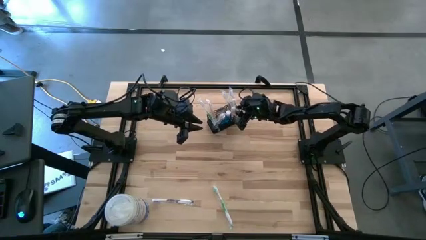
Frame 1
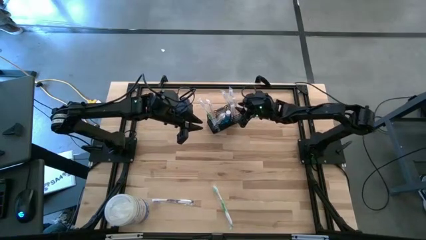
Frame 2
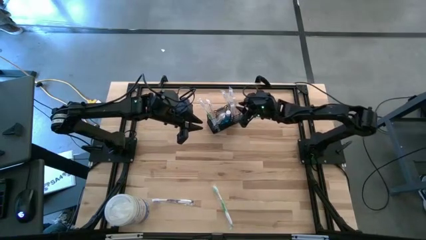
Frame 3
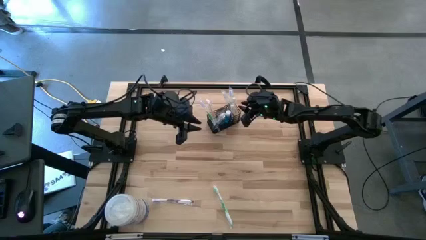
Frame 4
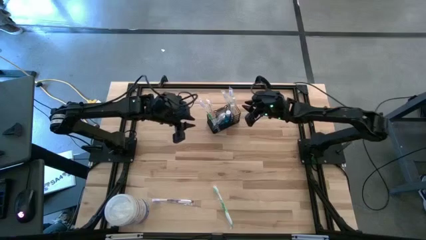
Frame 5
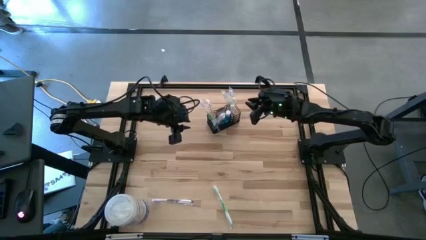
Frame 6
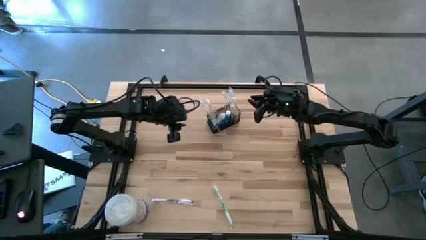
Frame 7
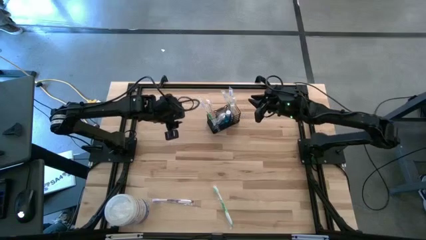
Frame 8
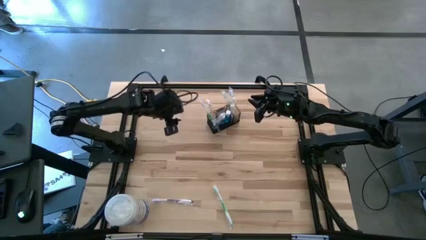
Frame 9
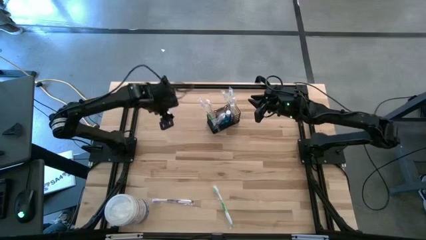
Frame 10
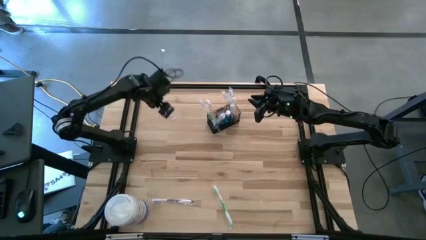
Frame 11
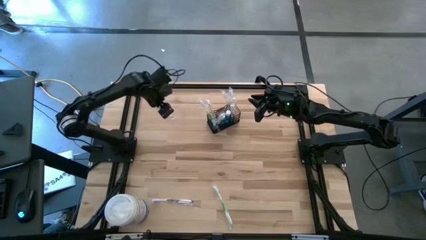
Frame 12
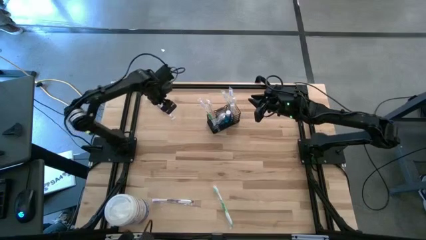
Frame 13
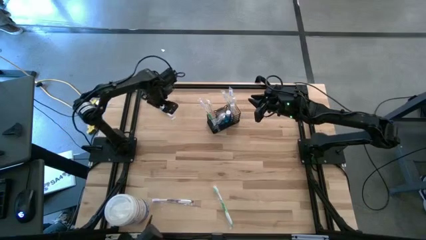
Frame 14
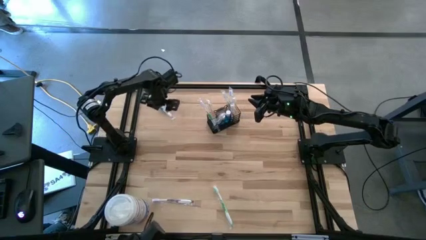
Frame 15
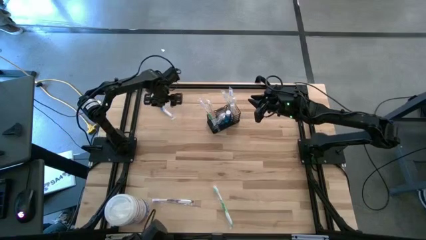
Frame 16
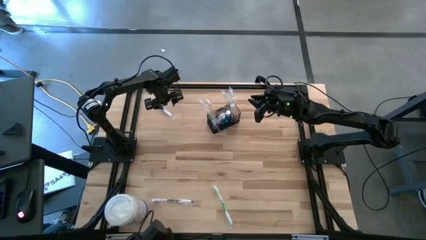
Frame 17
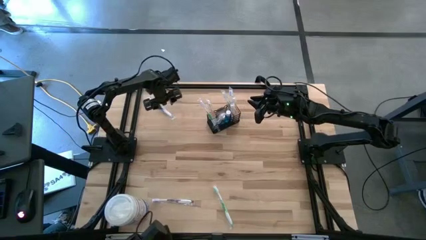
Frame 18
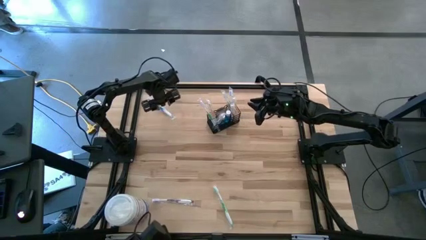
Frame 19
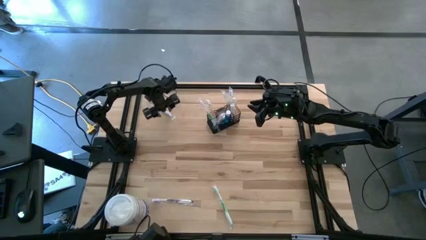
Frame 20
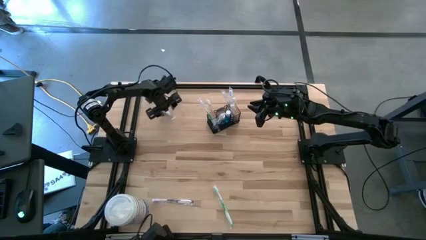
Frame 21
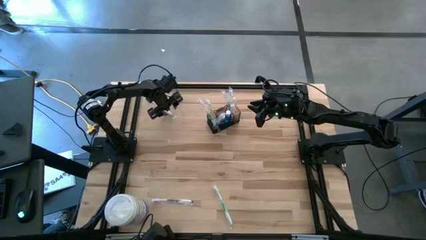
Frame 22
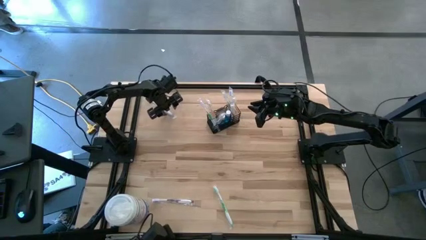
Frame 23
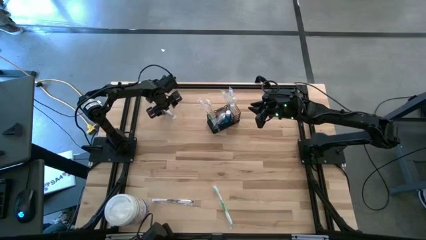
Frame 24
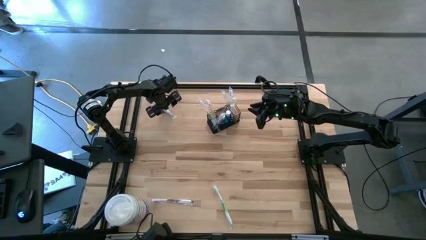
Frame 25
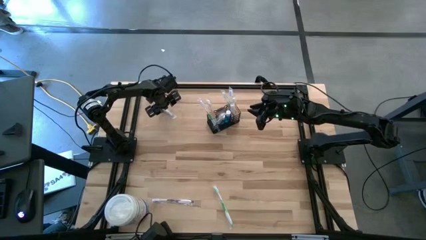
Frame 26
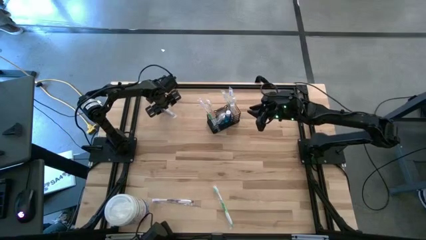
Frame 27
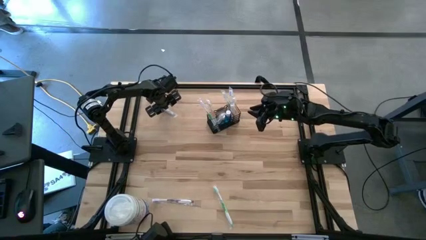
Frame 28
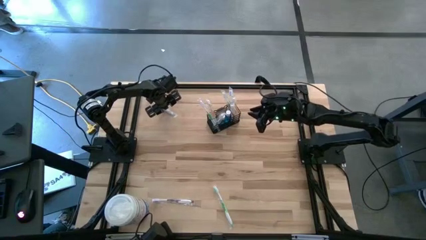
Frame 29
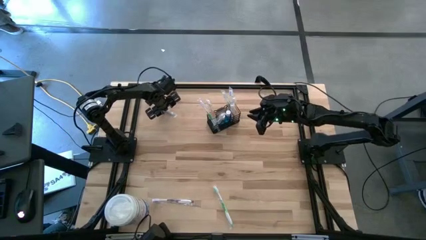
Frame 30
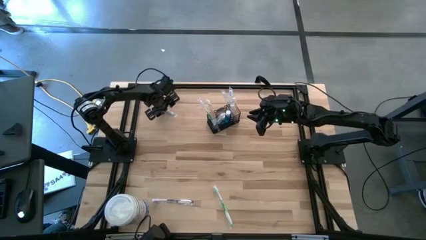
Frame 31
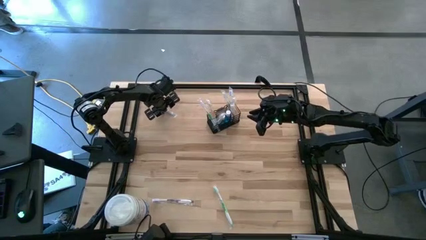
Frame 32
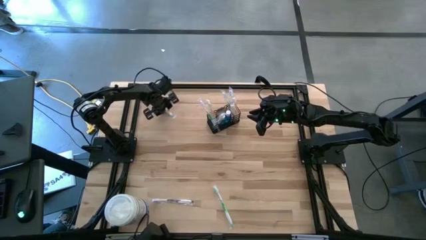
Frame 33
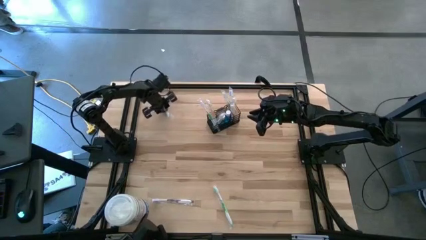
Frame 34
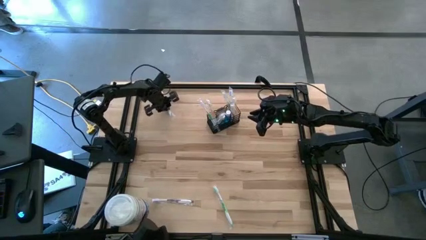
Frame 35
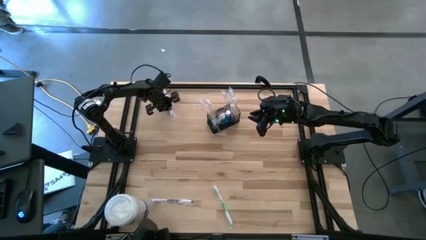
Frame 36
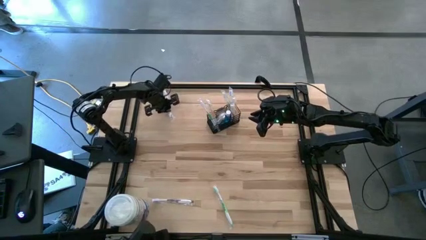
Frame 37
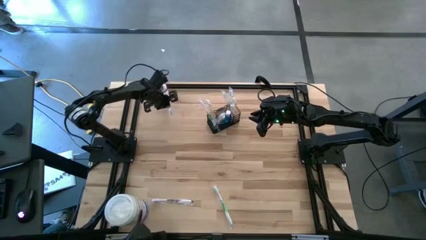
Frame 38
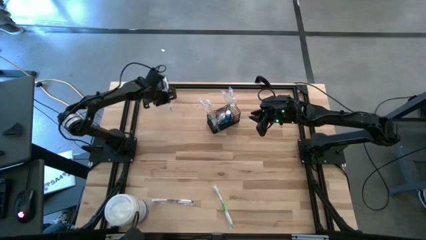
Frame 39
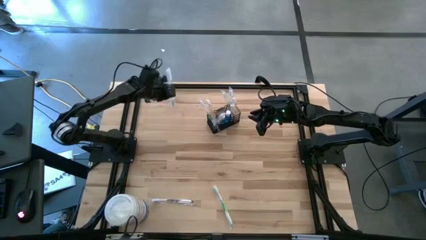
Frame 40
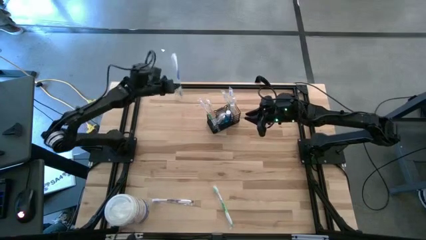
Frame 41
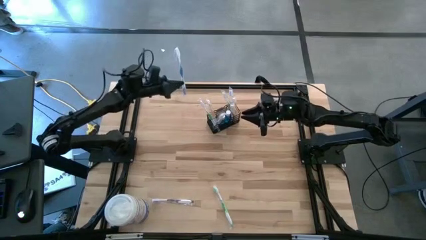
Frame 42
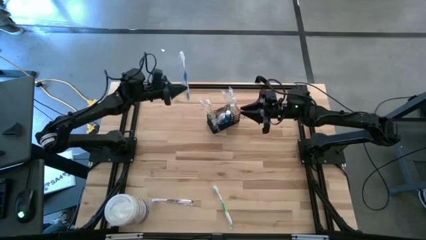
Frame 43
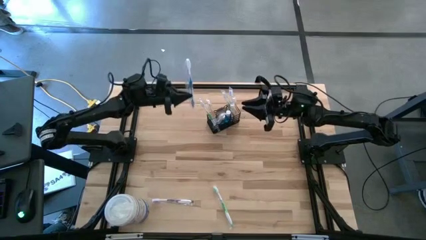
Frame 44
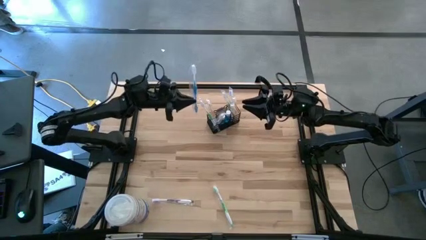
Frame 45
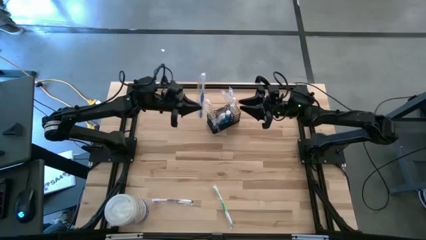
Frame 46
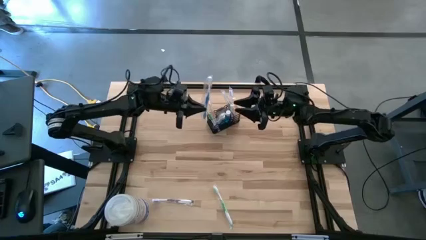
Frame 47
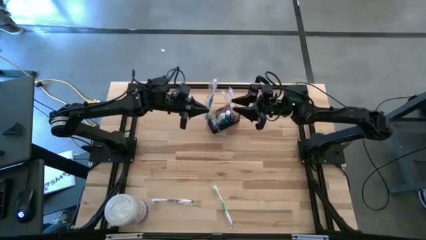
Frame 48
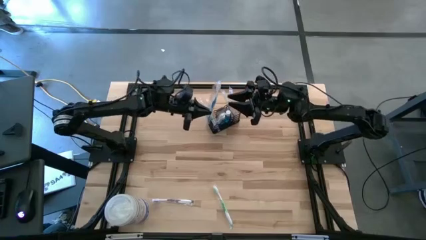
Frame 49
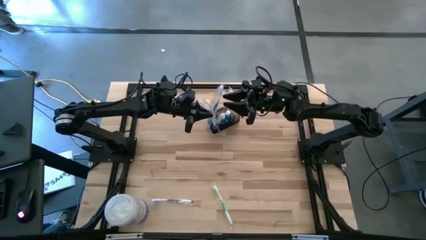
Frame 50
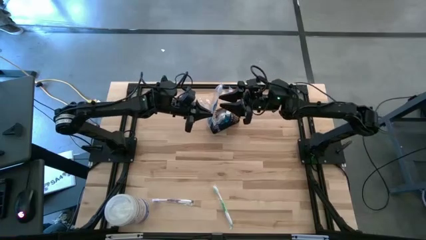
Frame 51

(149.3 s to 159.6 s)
Task: Pick & Place toothbrushing station
Put the blue toothbrush into the mesh organizer

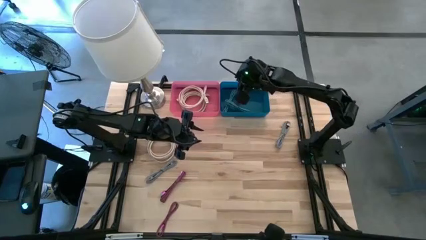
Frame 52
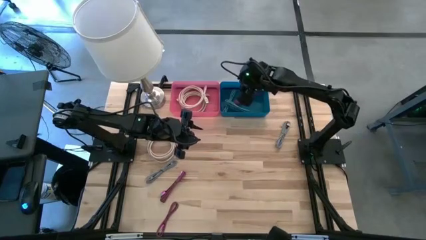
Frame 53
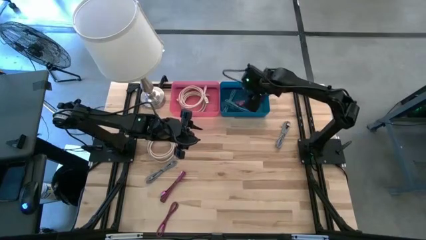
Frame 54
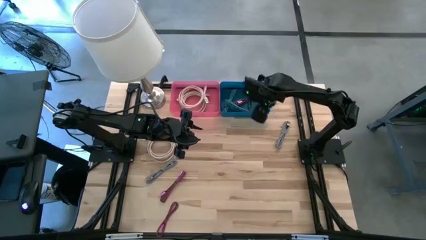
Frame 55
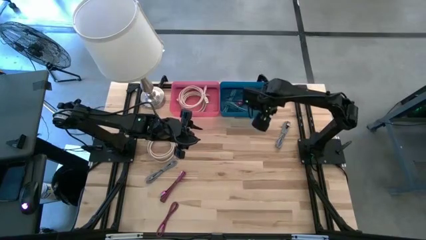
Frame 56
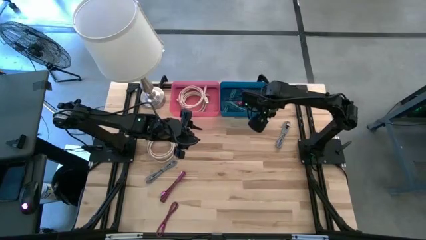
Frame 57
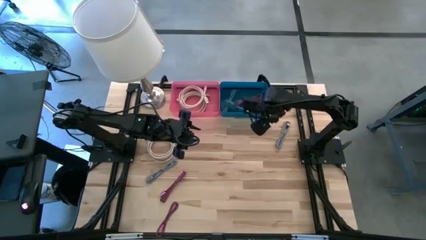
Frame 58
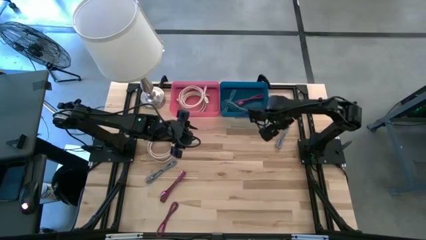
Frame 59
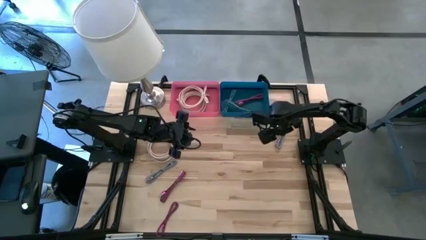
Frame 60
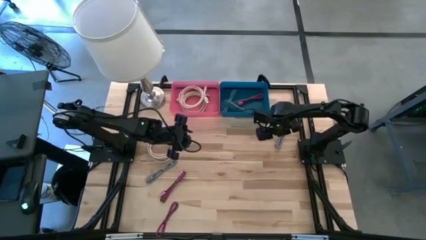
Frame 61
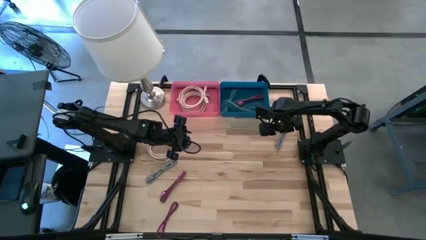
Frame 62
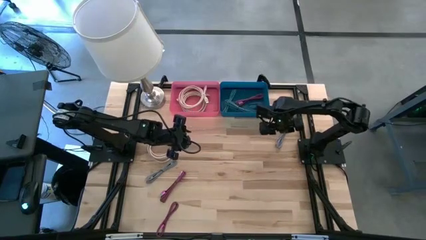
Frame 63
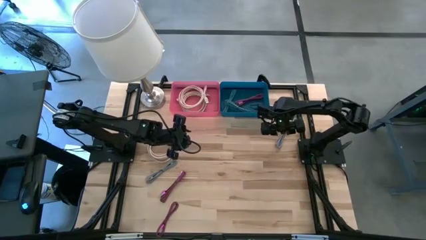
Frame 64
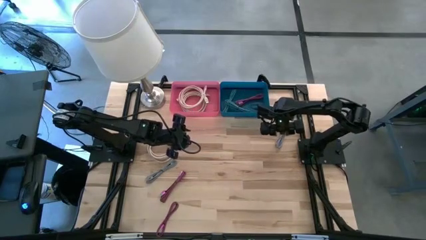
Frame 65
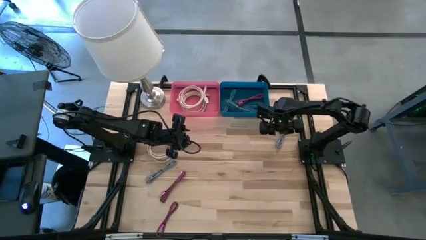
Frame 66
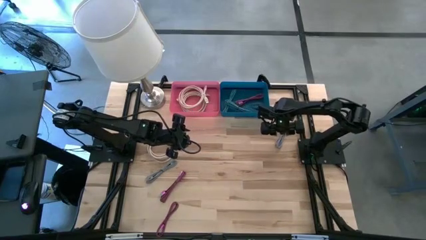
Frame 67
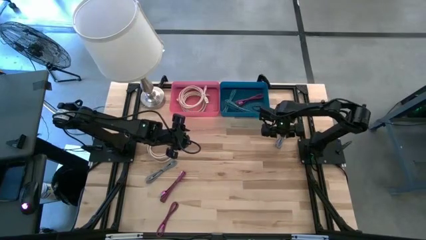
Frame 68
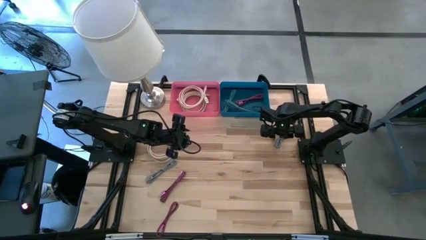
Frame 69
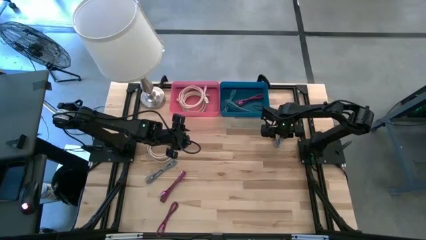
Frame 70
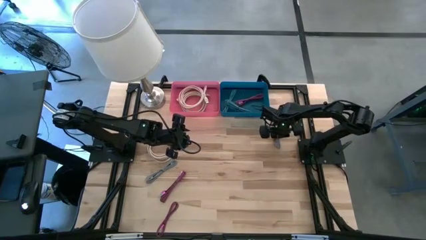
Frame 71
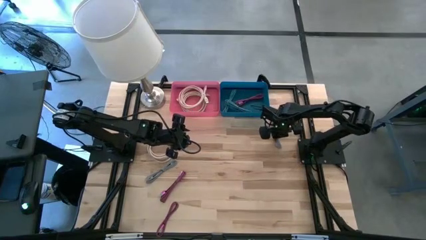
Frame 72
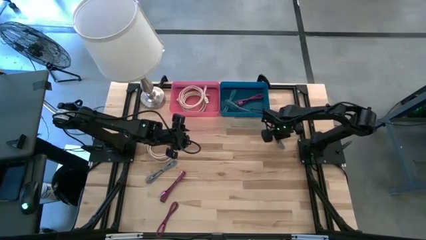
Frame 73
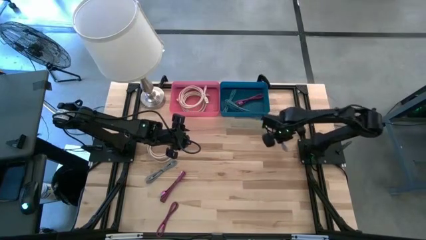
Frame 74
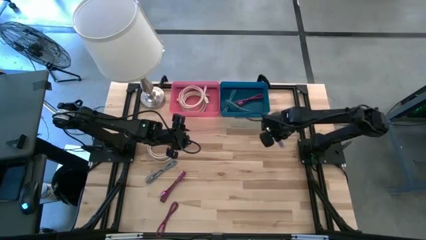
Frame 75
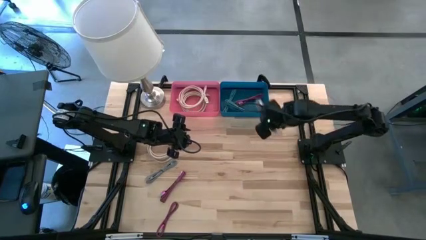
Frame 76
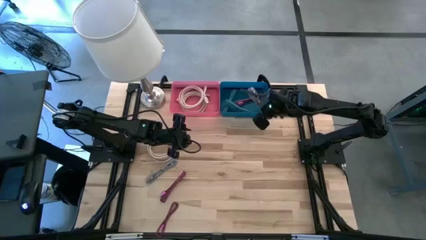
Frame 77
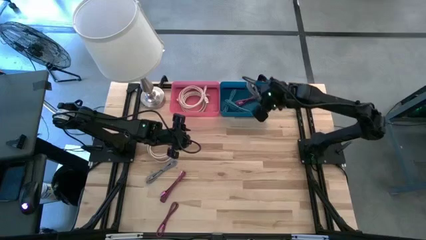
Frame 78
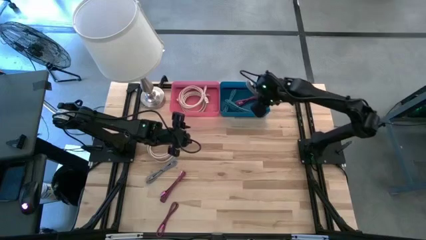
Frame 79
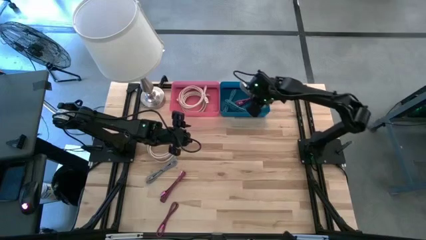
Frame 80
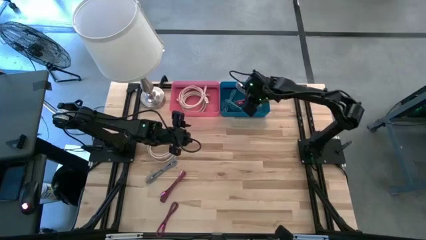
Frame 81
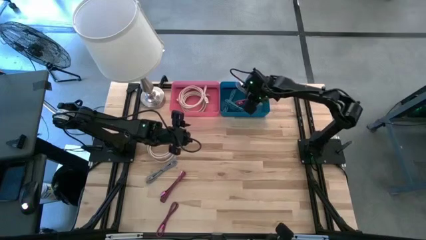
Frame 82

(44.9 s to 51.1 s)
Task: Pick & Place USB Port
Put the top small black and white charger cable into the blue bin
